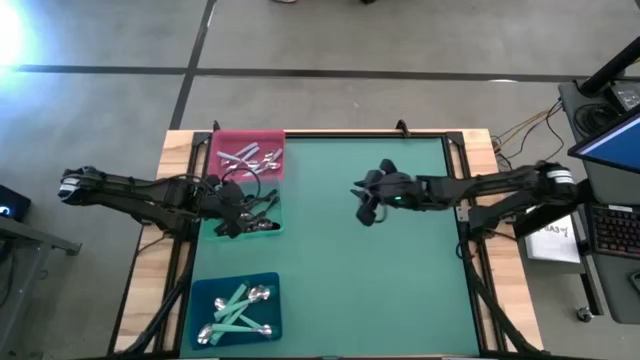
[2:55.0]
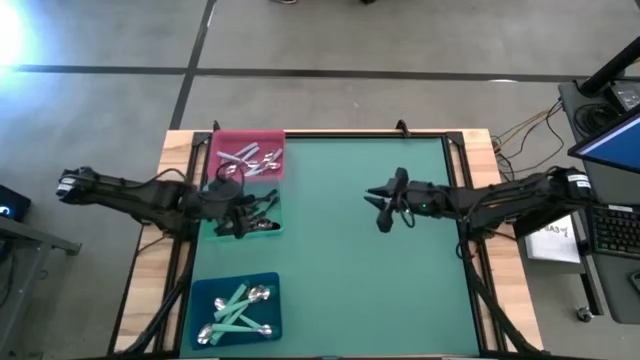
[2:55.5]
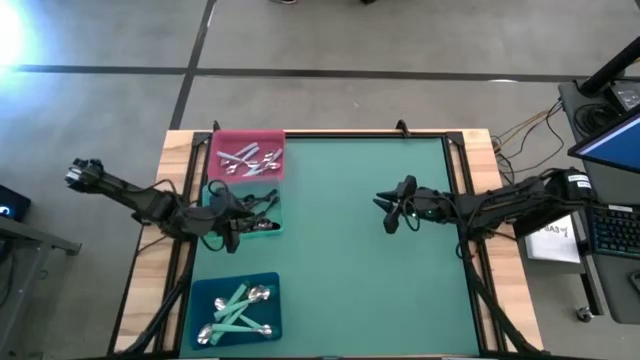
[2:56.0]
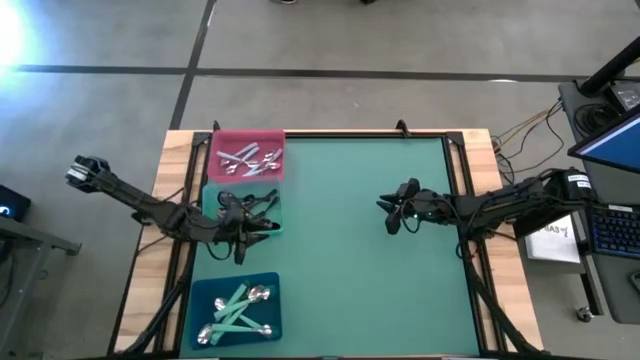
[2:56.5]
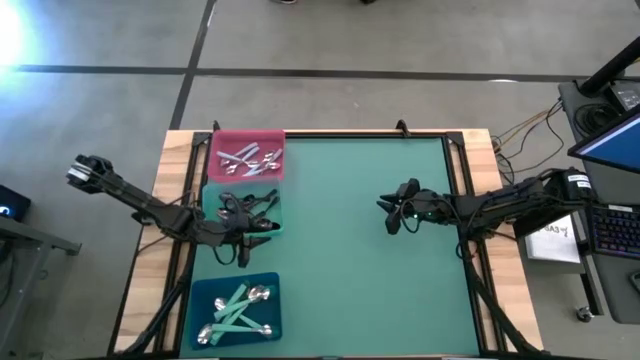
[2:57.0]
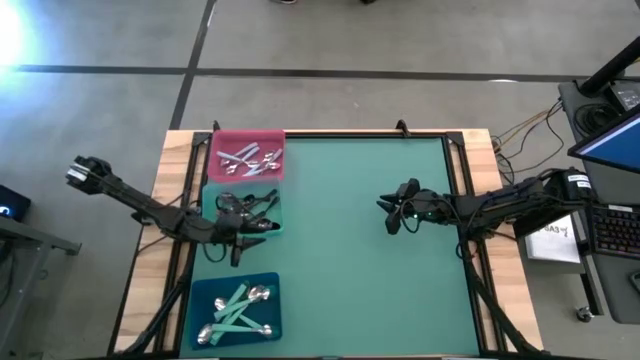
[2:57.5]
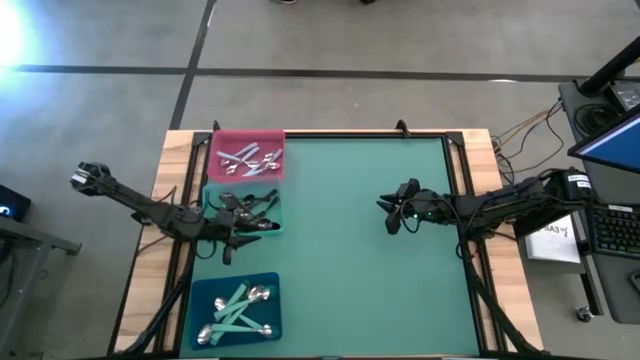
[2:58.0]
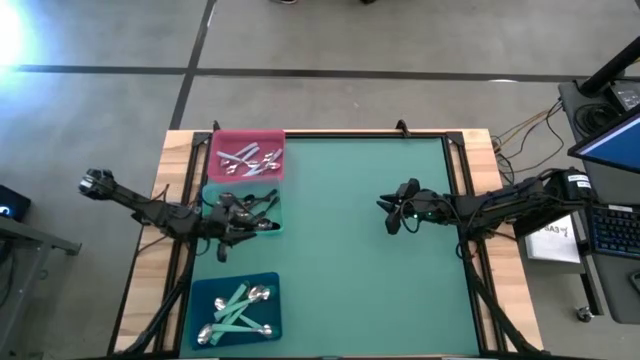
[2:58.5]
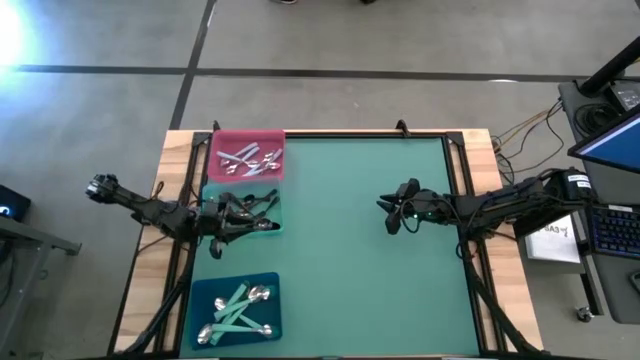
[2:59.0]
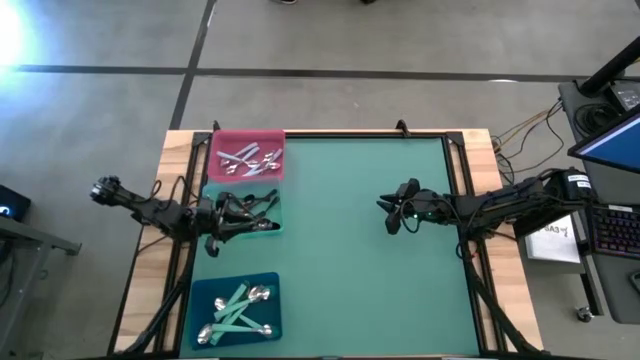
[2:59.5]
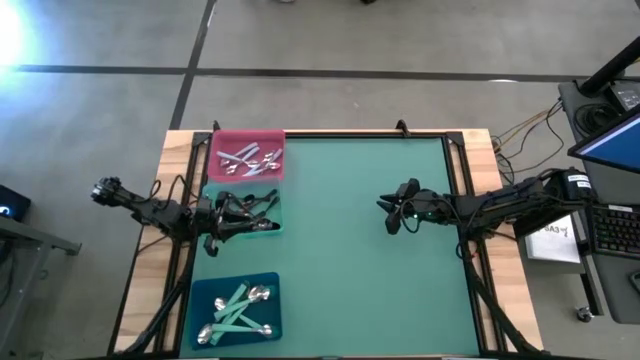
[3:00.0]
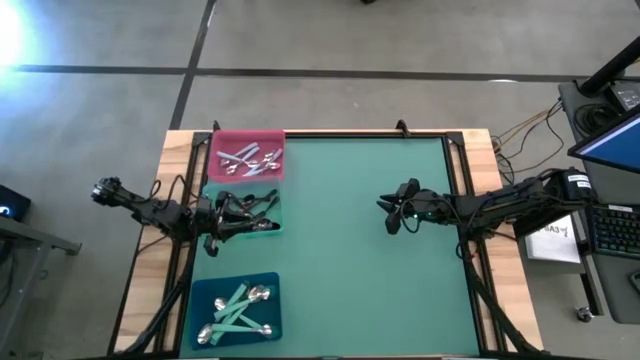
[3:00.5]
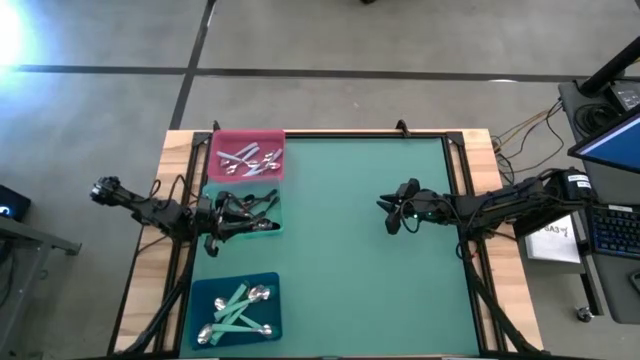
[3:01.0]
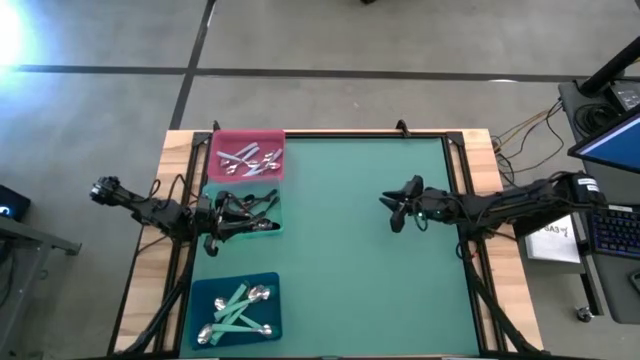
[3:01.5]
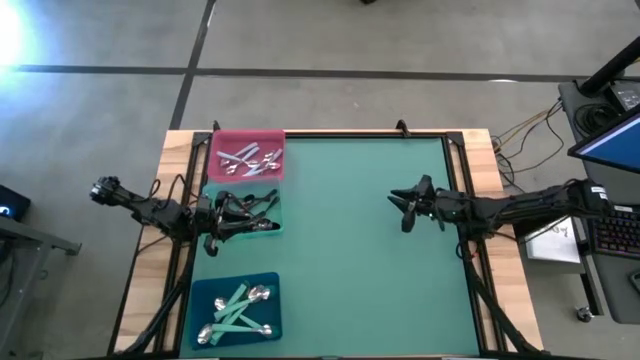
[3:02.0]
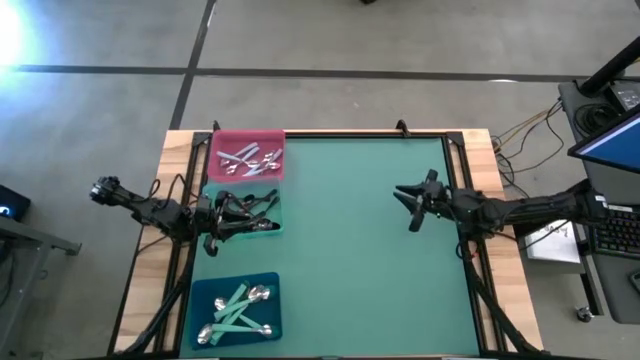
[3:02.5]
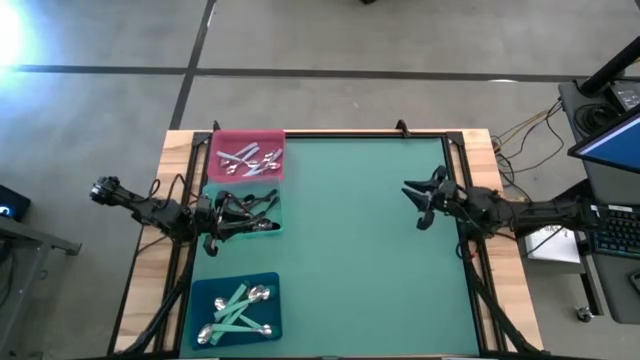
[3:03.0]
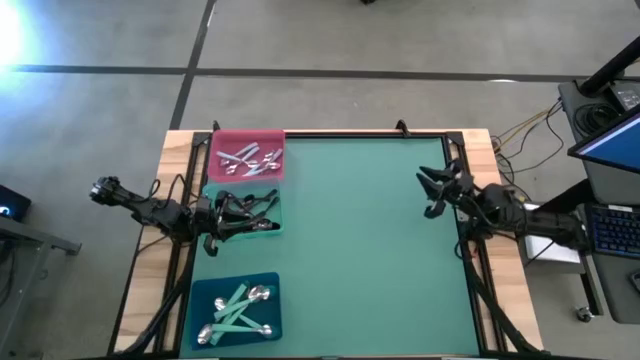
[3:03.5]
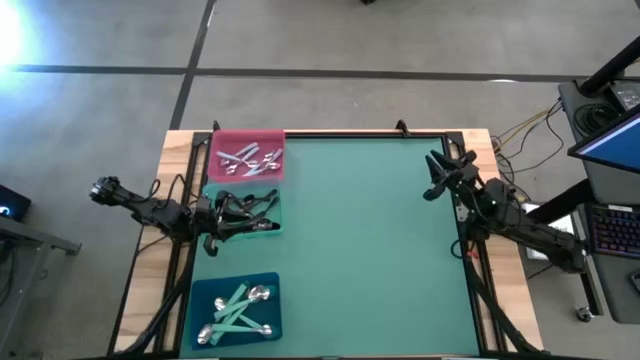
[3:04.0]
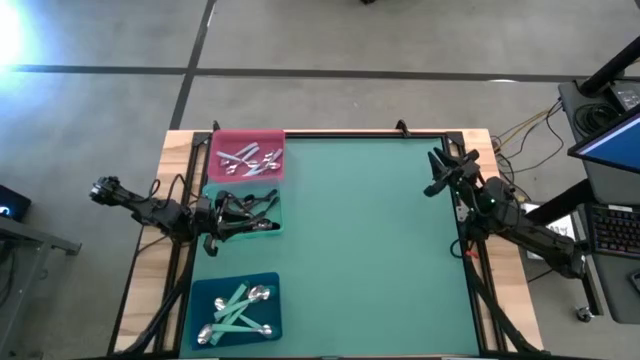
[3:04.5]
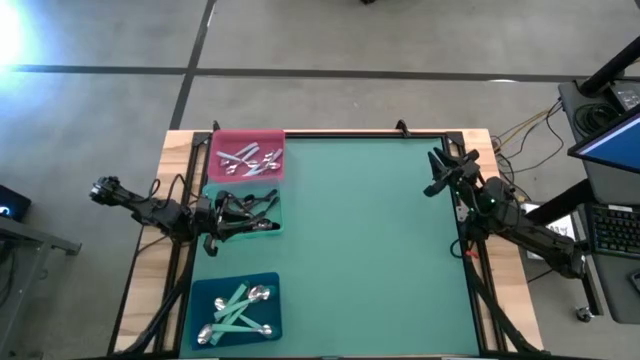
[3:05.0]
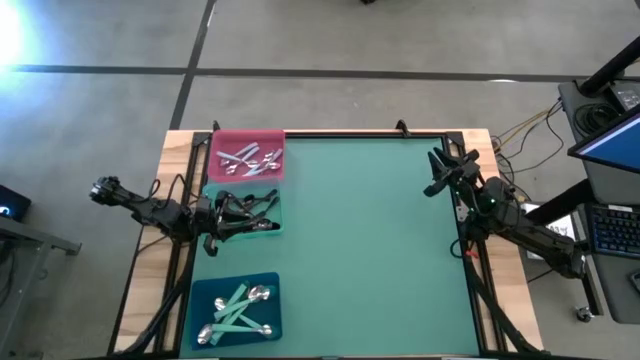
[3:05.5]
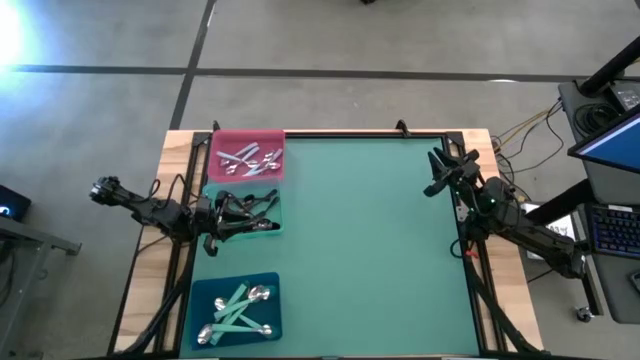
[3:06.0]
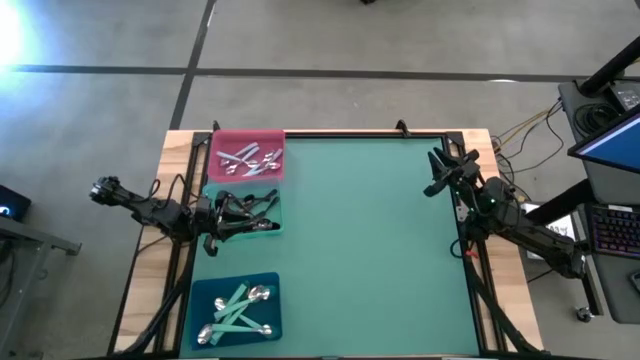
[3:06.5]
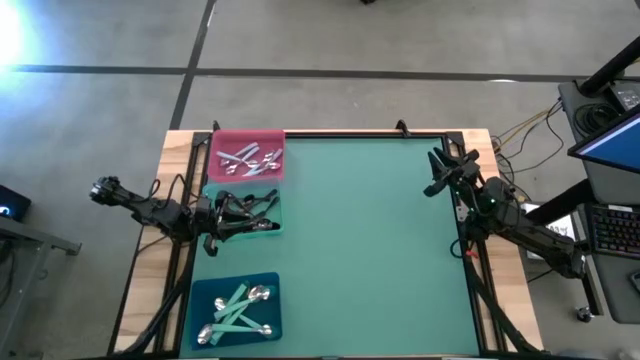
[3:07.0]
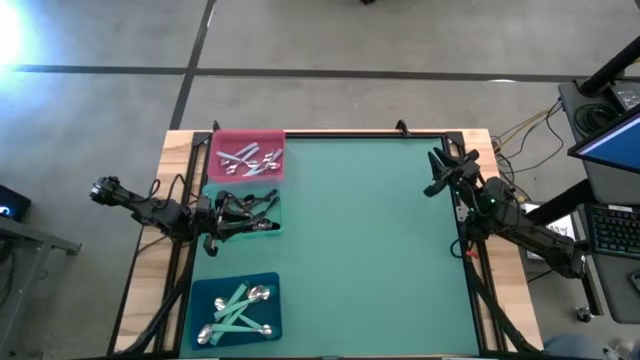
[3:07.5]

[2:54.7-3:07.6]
Task: Sort silverware by color (type)
Return to Home Position

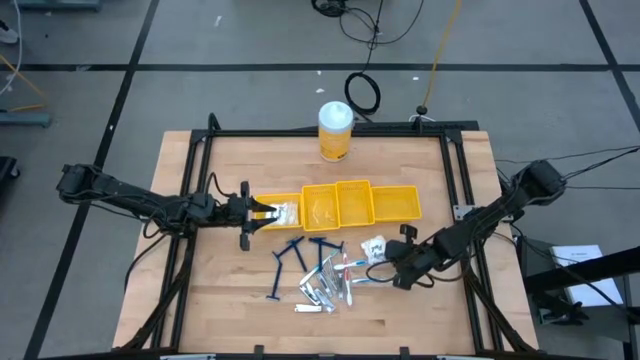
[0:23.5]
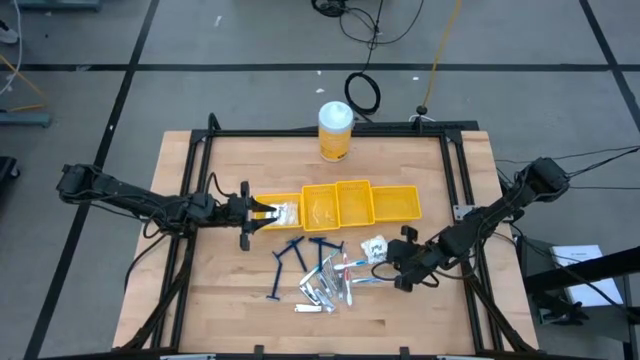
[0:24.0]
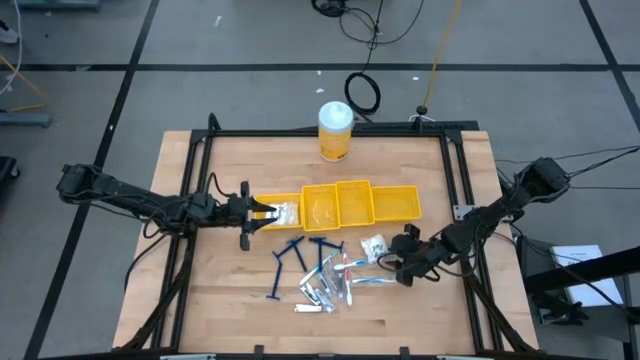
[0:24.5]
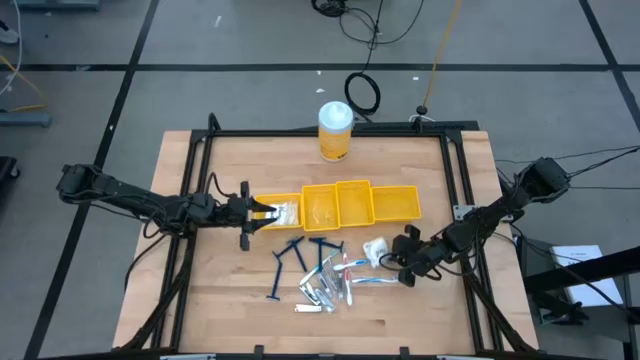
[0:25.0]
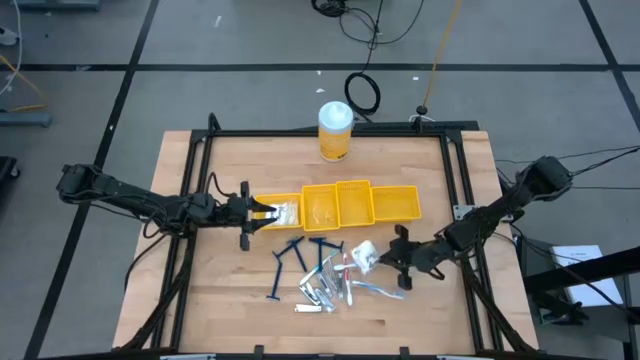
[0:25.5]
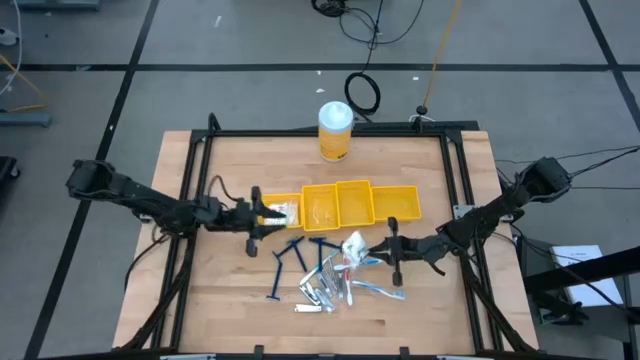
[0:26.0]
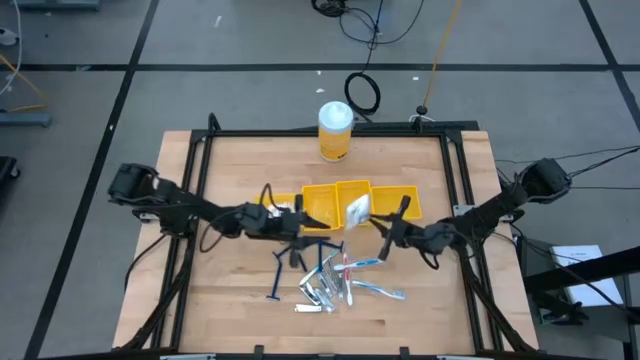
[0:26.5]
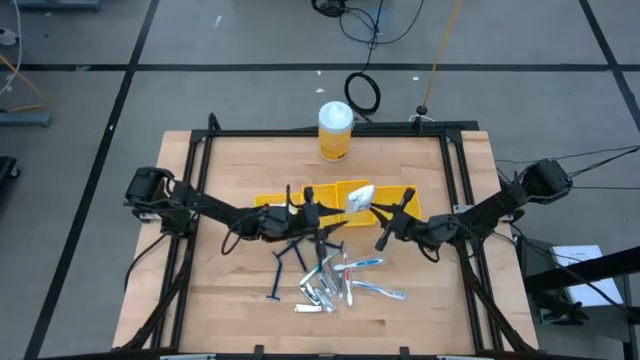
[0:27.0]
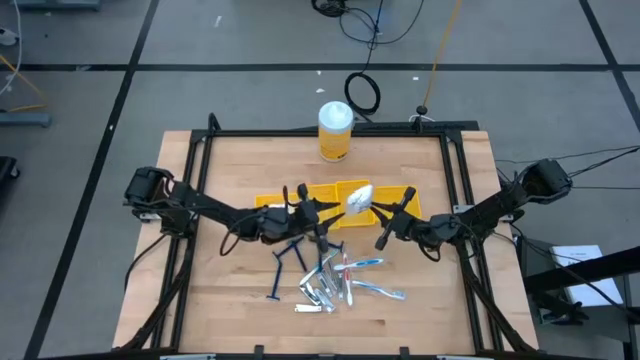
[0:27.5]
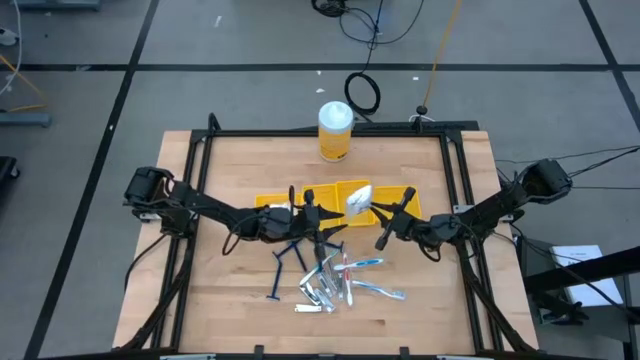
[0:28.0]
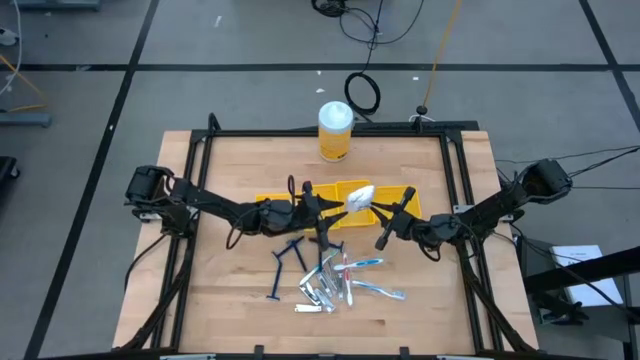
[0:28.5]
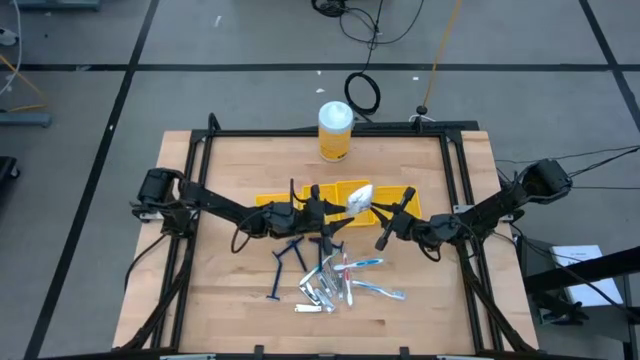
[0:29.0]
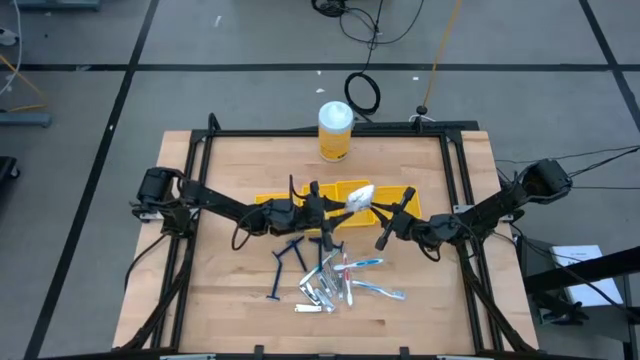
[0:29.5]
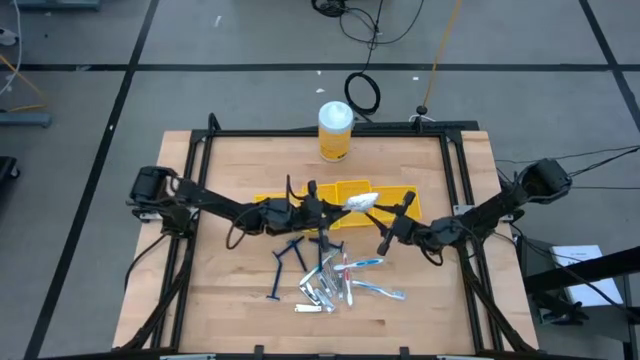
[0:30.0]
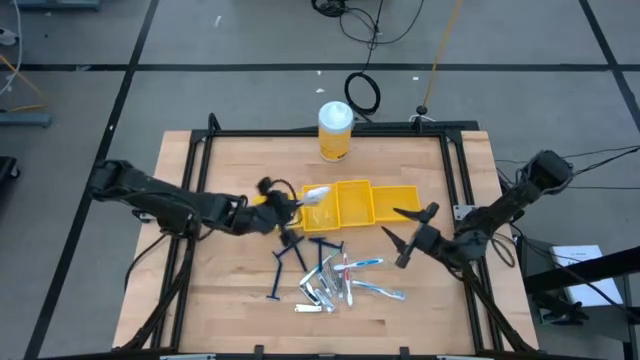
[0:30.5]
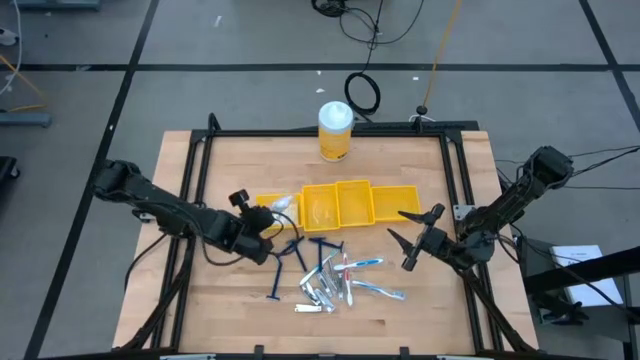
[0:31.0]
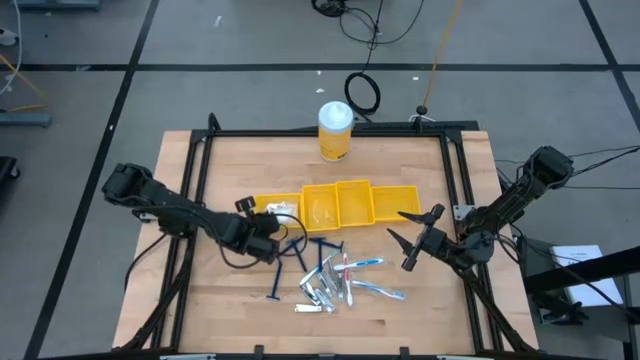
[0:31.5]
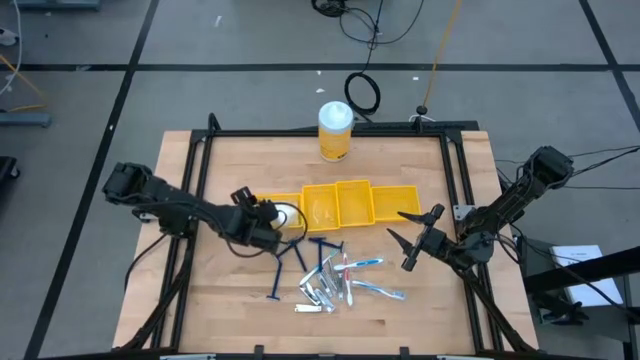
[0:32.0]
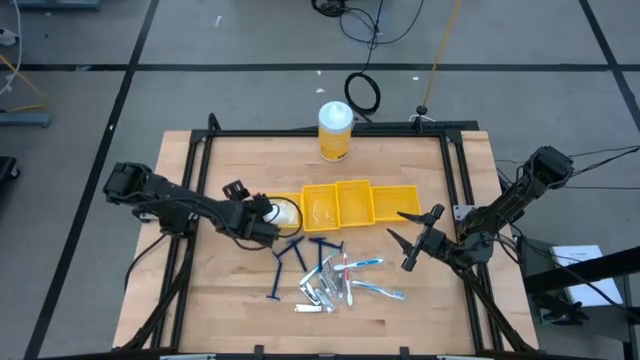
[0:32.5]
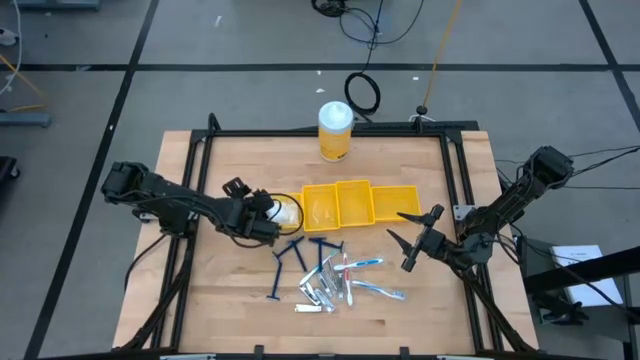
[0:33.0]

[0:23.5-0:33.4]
Task: Pick & Place Travel size toiletries
Put the vanity pack into the left yellow bin
